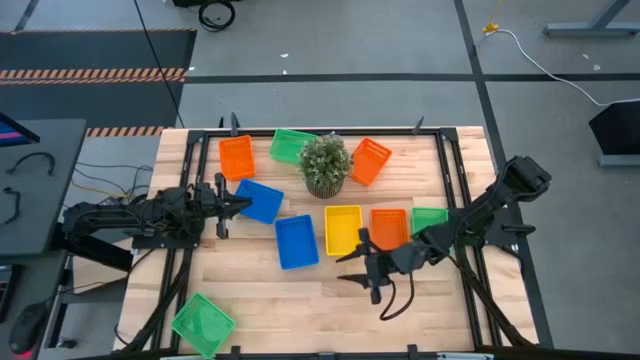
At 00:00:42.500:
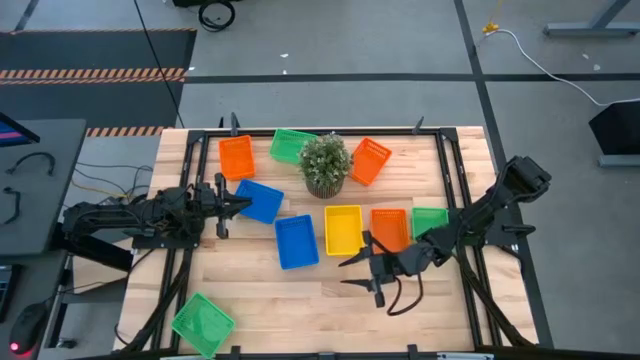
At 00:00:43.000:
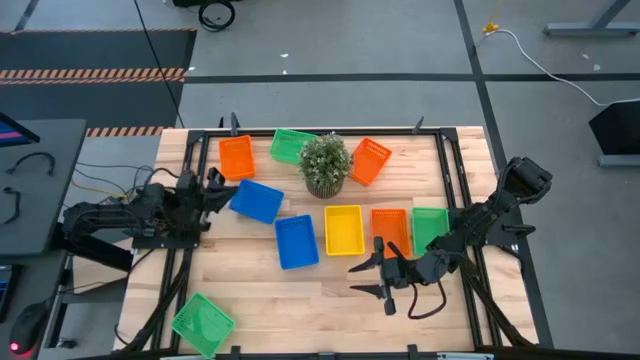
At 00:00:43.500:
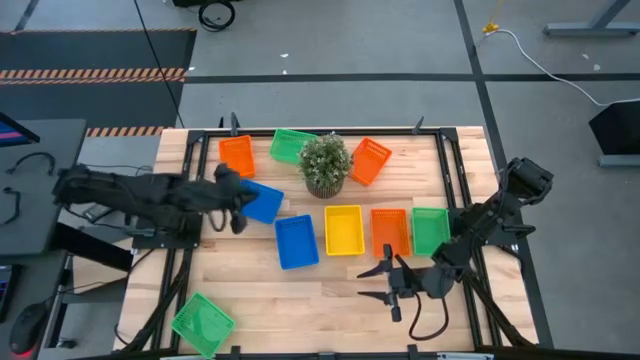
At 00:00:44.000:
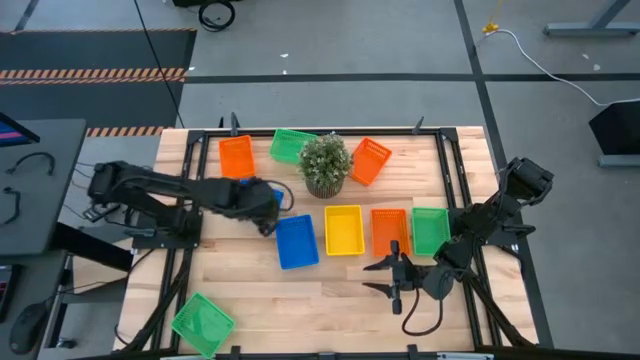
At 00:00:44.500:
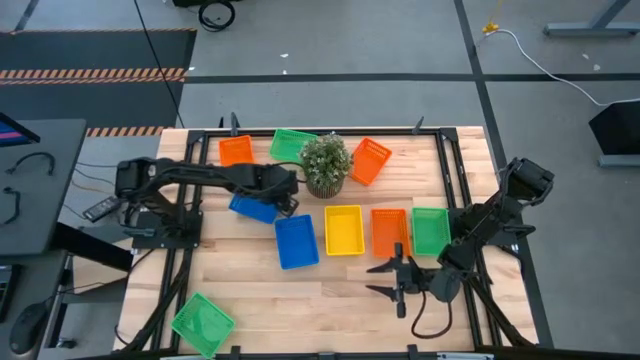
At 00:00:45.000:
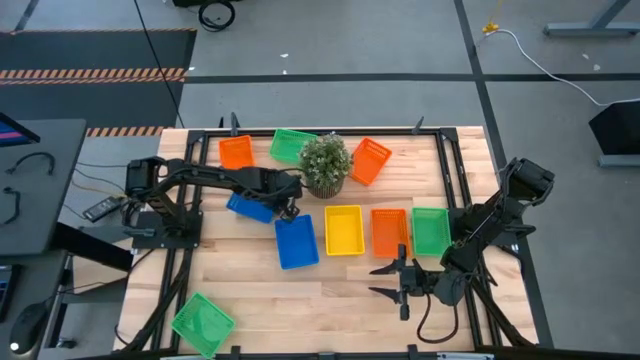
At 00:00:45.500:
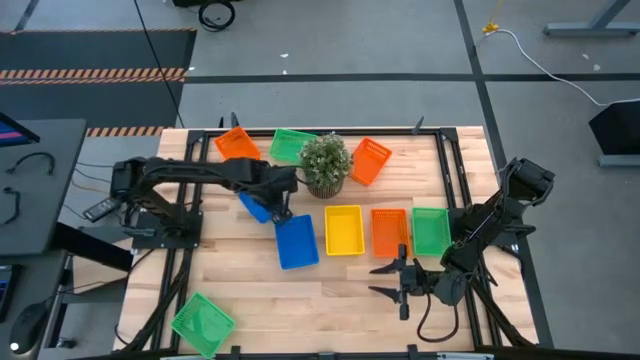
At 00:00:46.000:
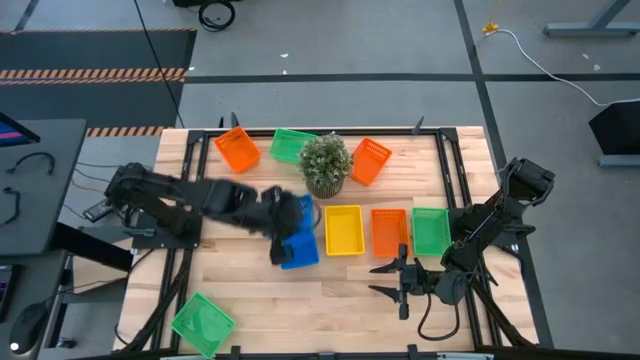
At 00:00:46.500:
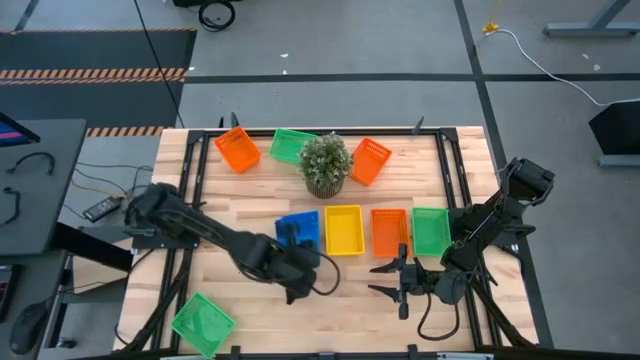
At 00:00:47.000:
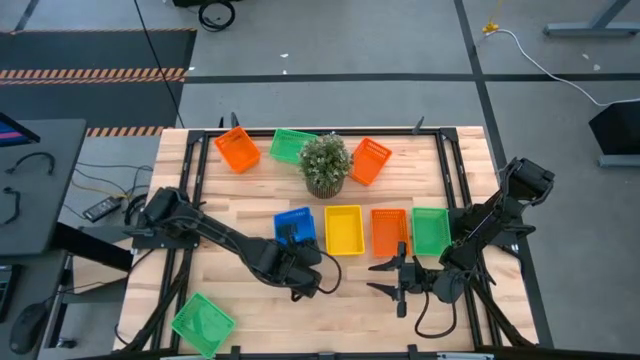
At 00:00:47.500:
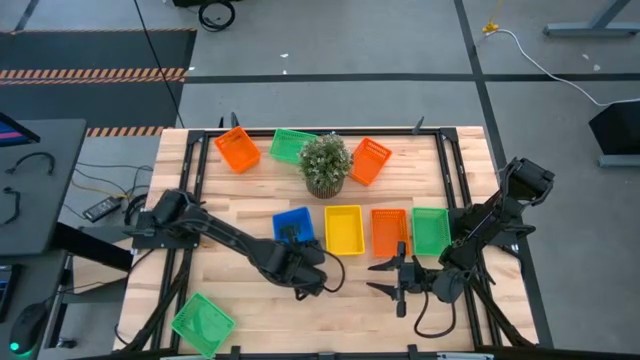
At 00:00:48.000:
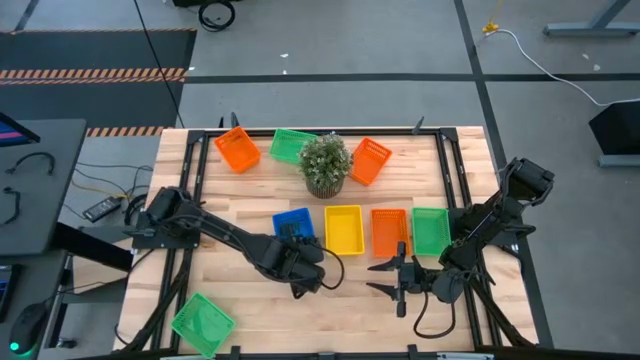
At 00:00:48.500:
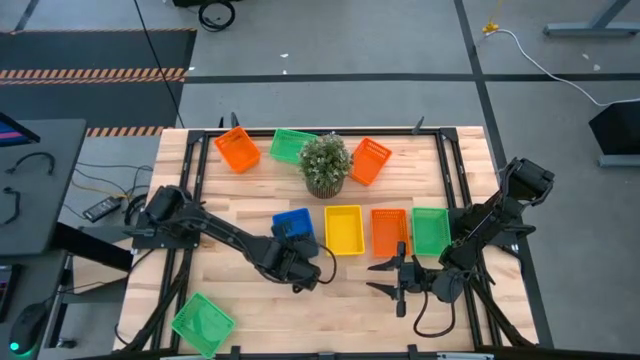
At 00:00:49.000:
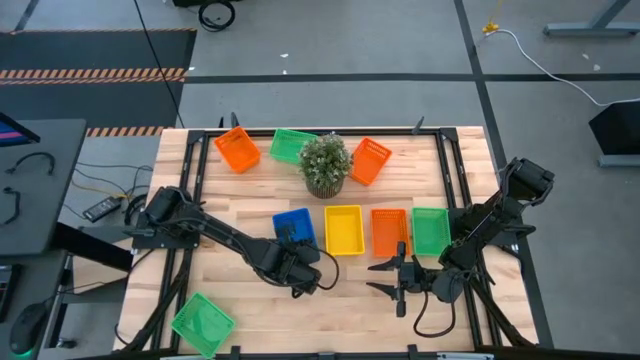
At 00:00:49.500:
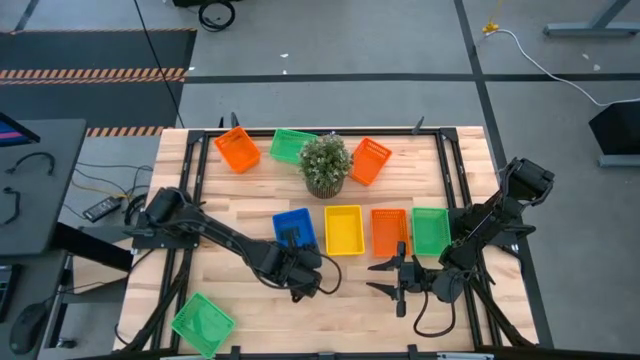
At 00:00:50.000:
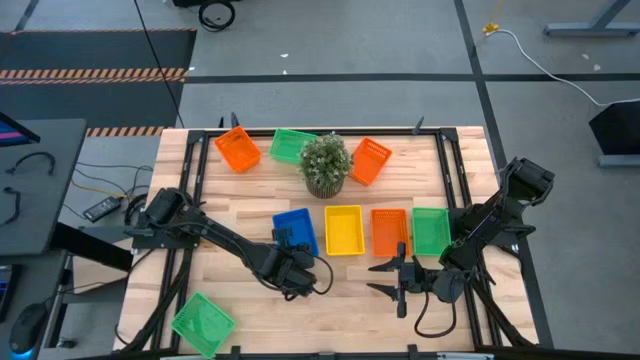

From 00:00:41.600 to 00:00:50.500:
Stack the top blue bin on top of the bottom blue bin

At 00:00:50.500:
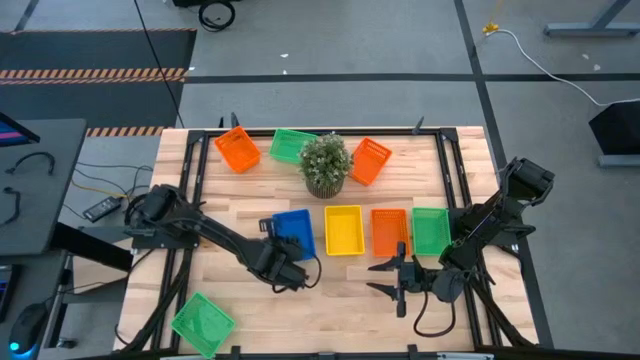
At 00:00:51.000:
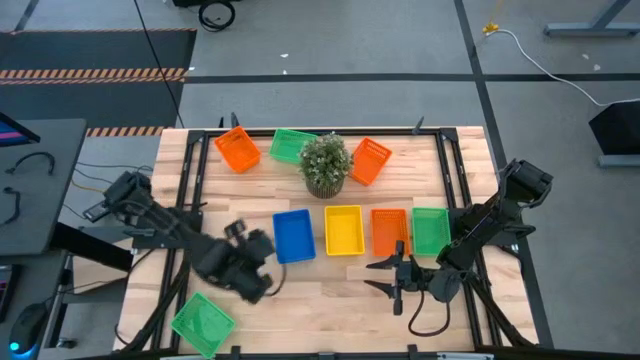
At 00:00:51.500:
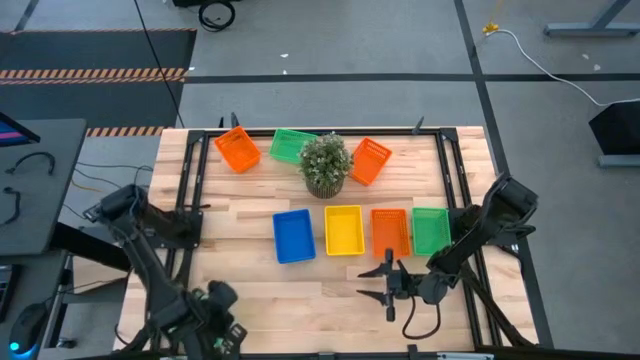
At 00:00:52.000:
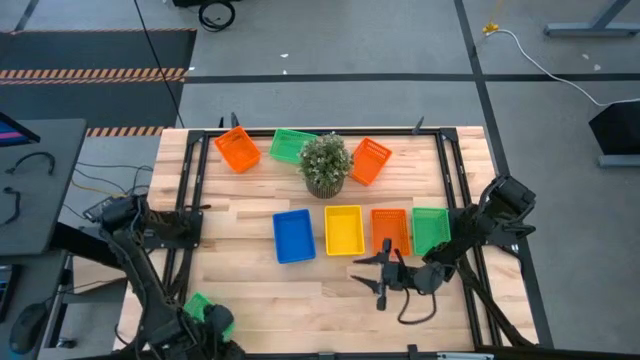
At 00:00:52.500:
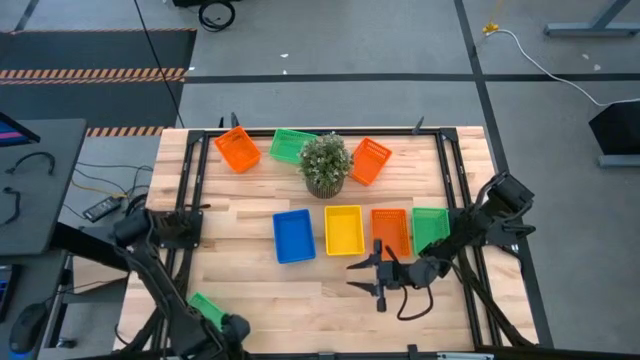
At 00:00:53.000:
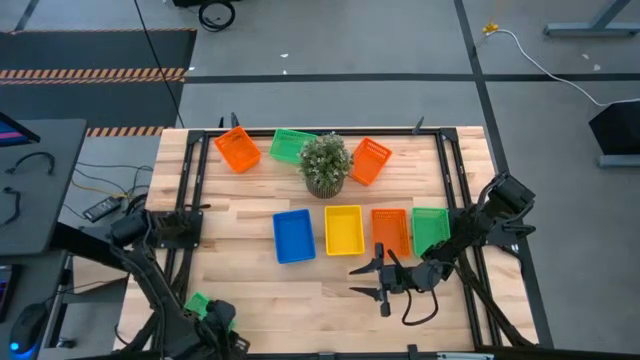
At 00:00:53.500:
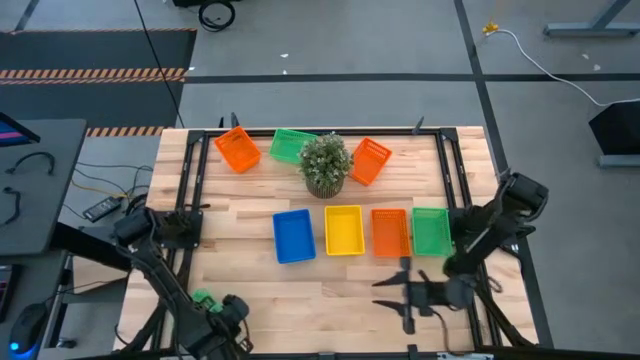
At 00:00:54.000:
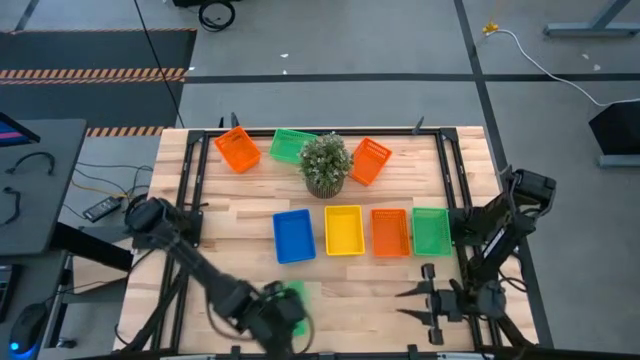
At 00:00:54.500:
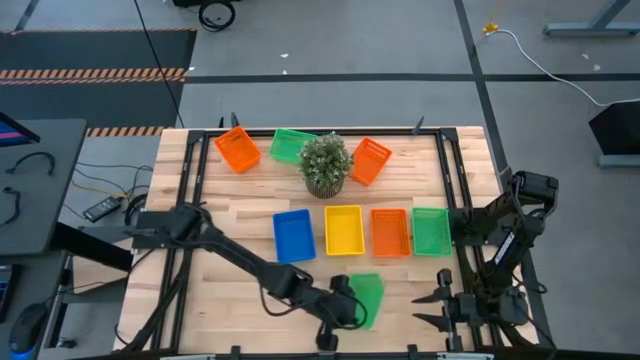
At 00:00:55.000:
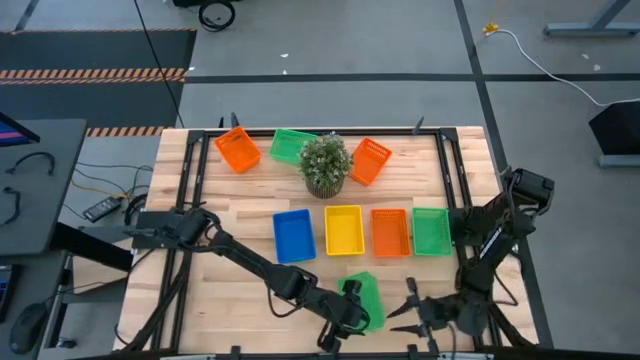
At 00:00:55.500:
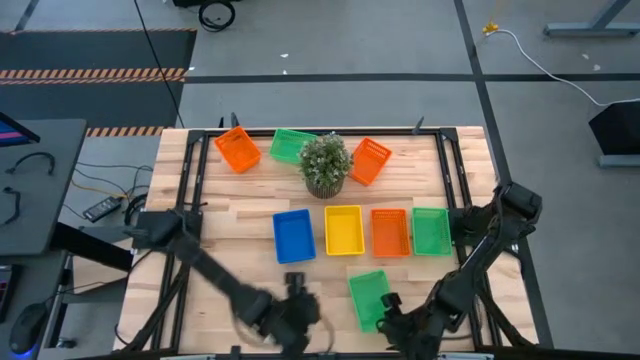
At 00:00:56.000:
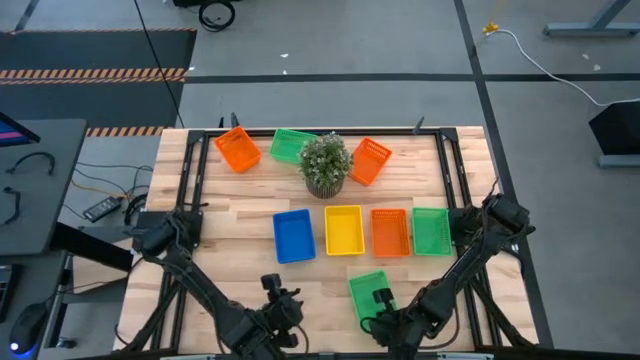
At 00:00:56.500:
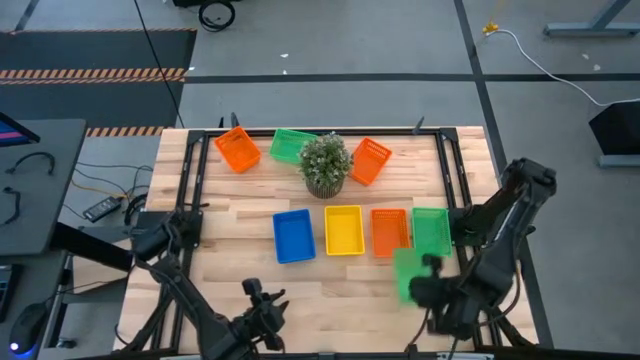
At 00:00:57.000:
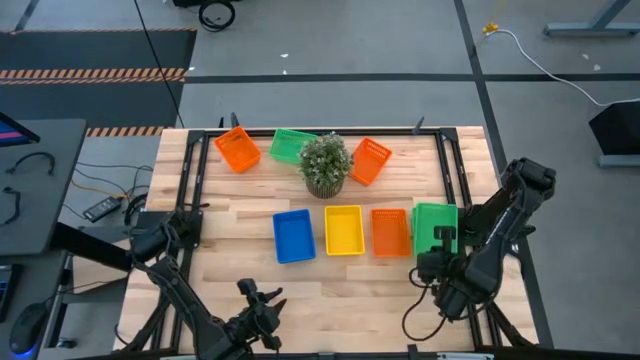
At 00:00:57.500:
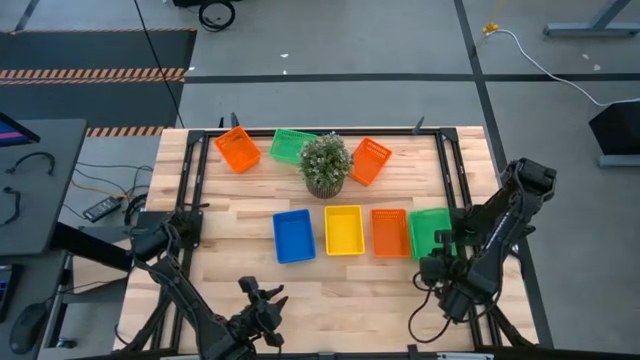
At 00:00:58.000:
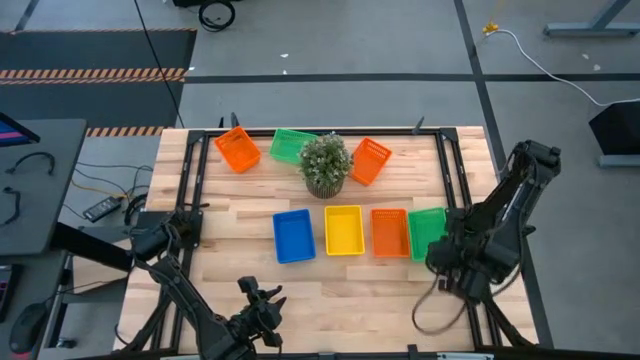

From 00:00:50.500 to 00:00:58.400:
Stack the bottom green bin on top of the middle green bin

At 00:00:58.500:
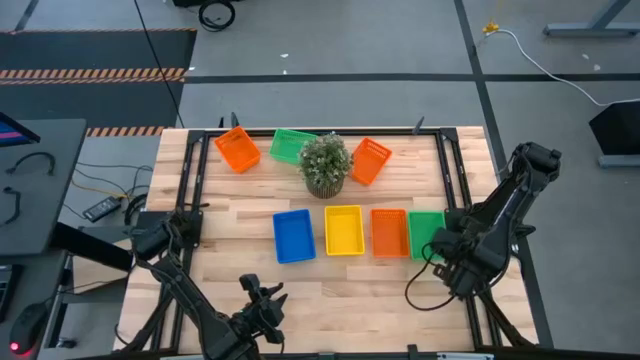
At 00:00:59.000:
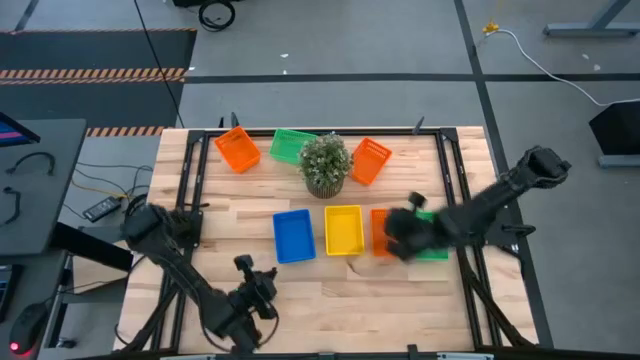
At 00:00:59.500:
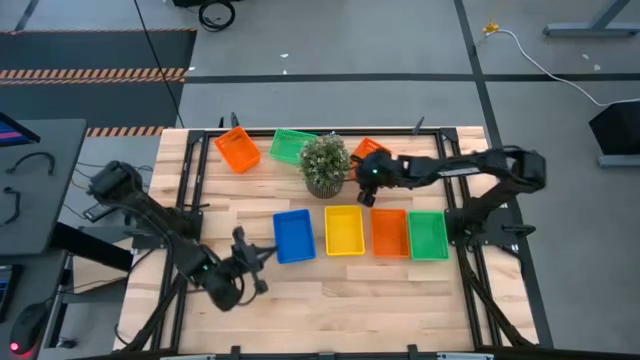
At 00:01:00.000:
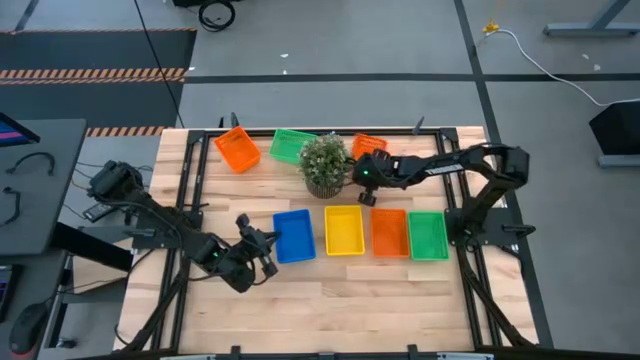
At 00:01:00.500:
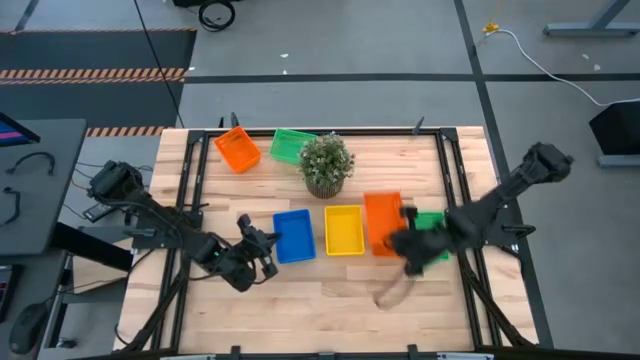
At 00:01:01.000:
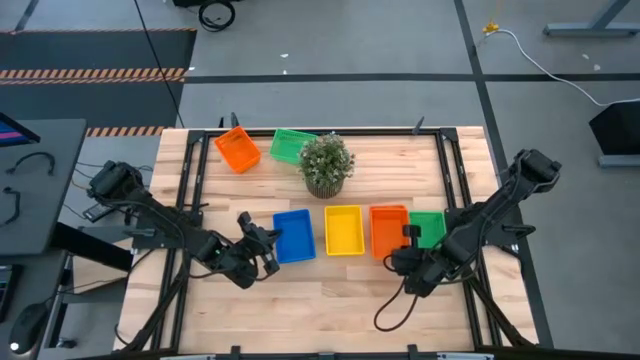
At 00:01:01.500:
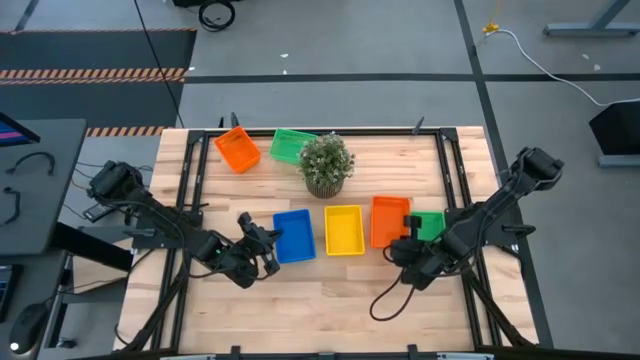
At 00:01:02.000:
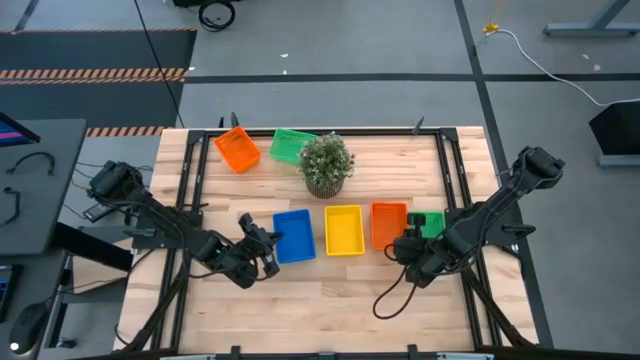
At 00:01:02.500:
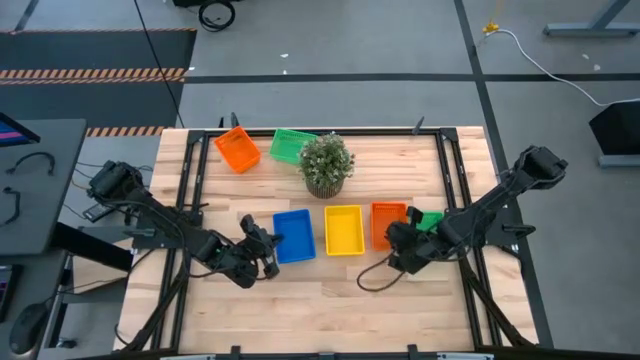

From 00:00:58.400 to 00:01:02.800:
Stack the top right orange bin on top of the bottom orange bin
